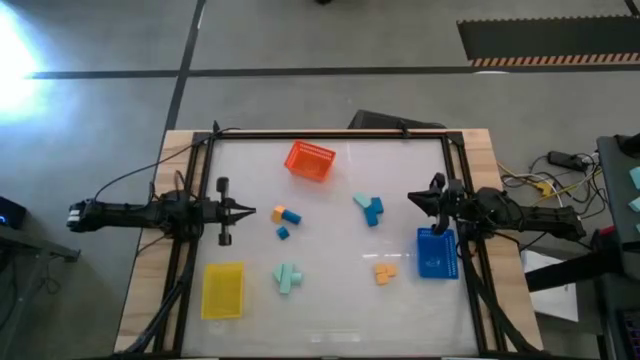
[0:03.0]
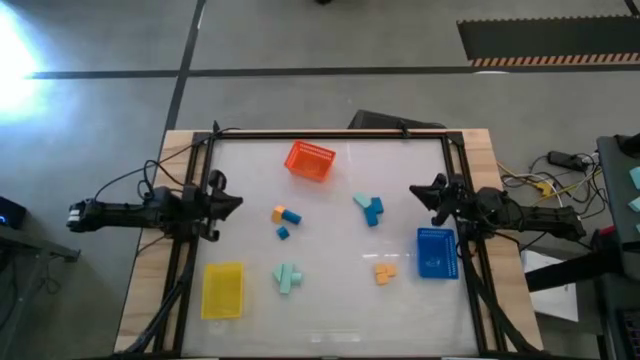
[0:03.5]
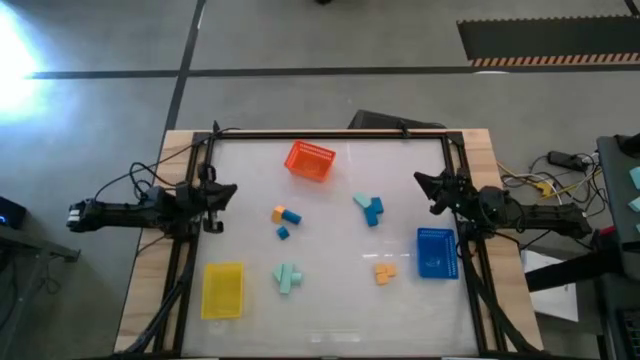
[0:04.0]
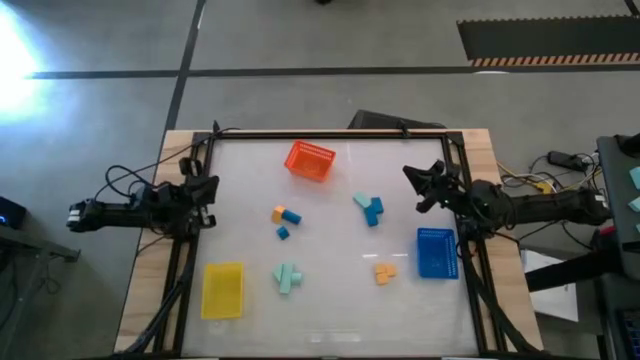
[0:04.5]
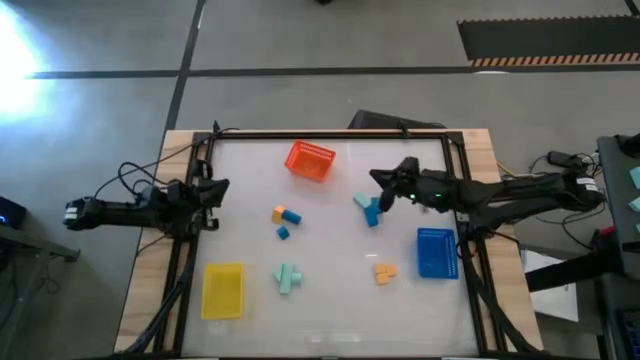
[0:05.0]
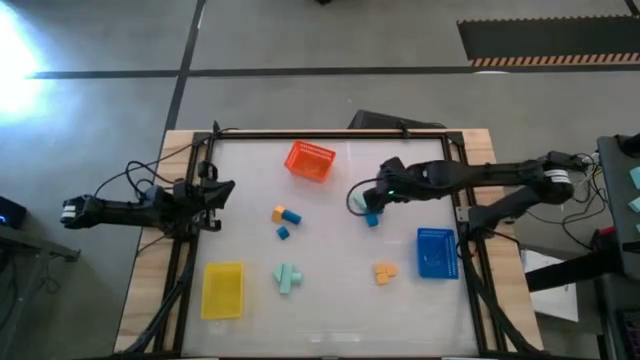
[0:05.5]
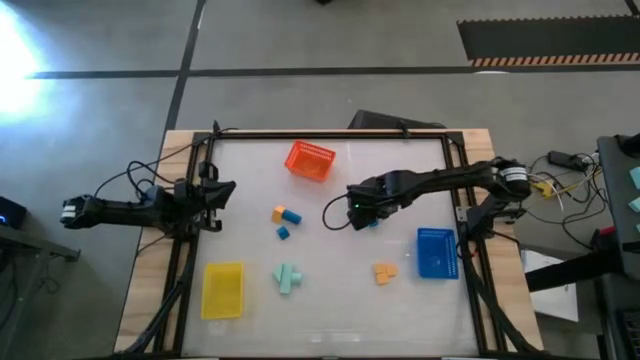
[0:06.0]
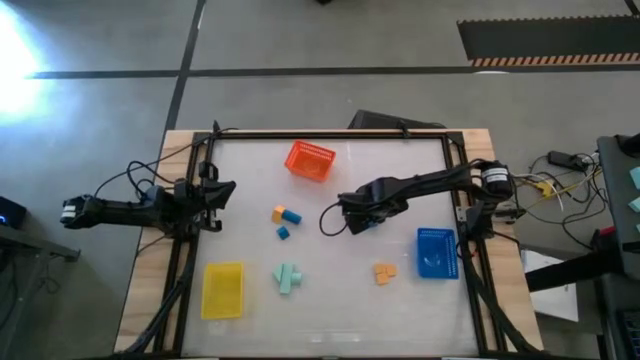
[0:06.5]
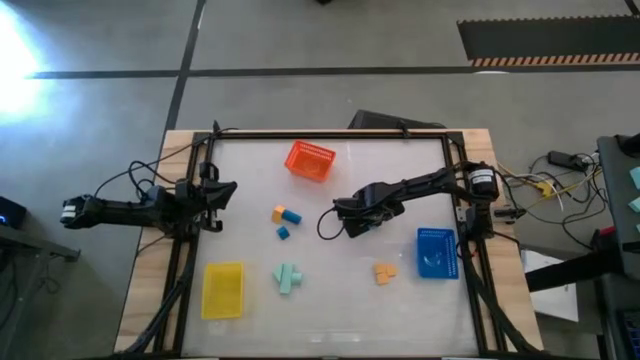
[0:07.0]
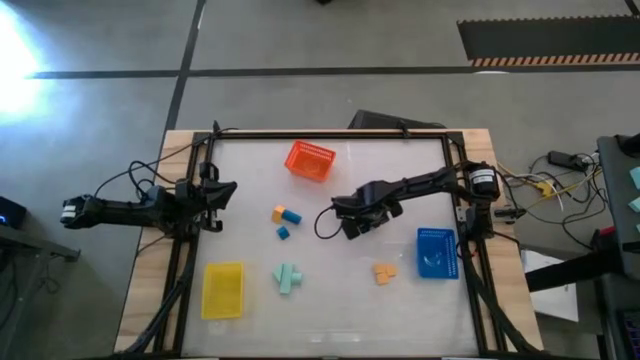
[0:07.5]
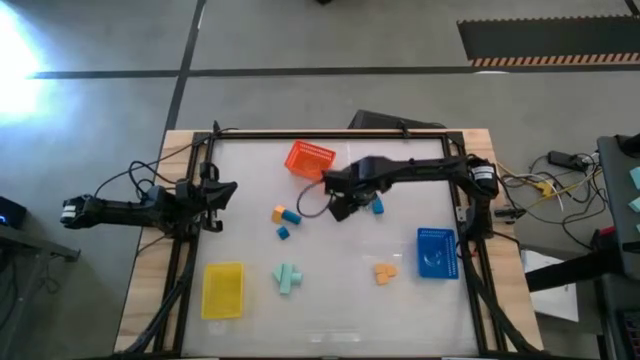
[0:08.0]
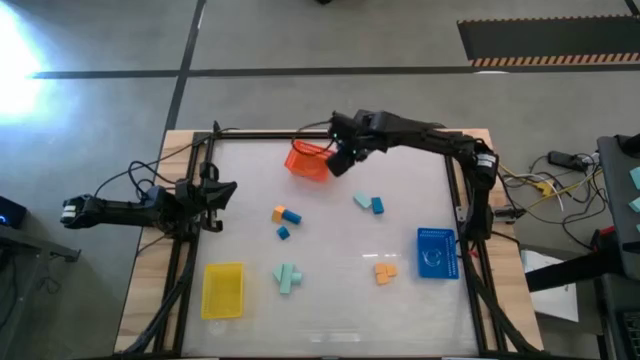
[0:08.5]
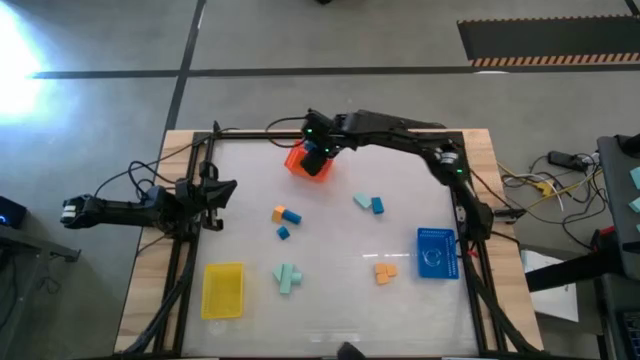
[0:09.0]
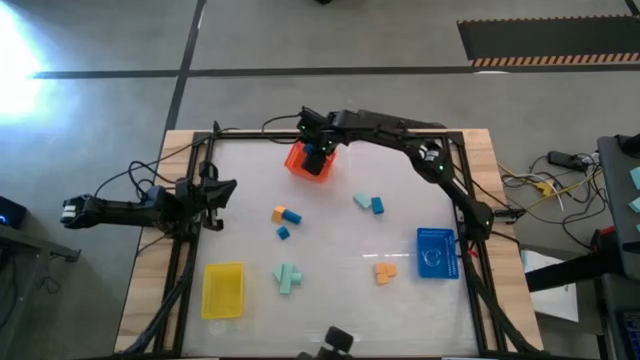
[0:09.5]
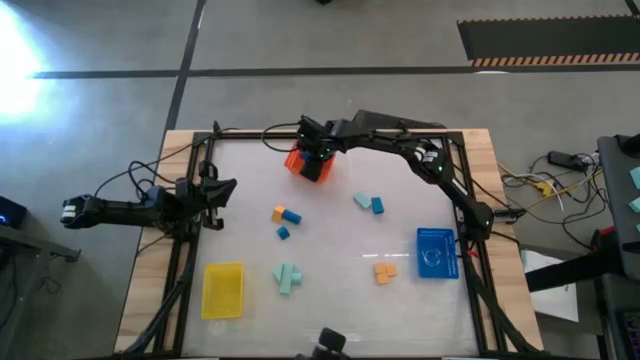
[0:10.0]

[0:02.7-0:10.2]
Task: Sort & place blocks by color
Put the blue block into the orange bin

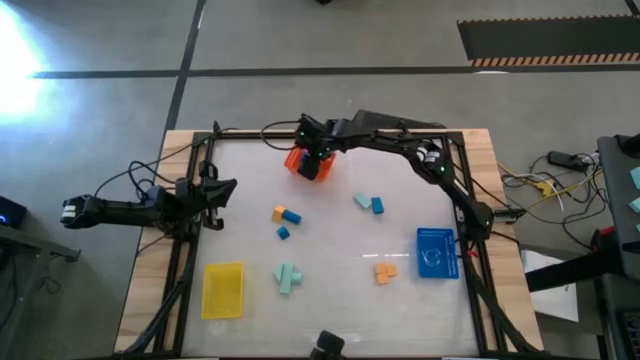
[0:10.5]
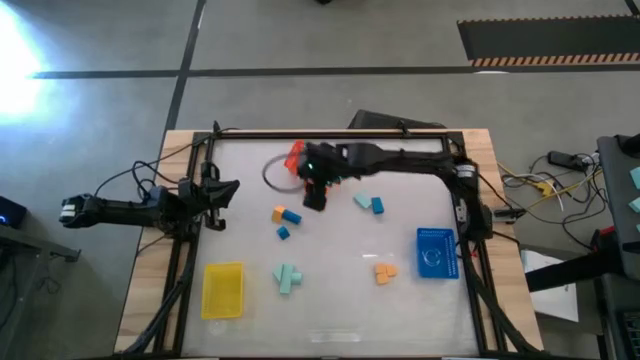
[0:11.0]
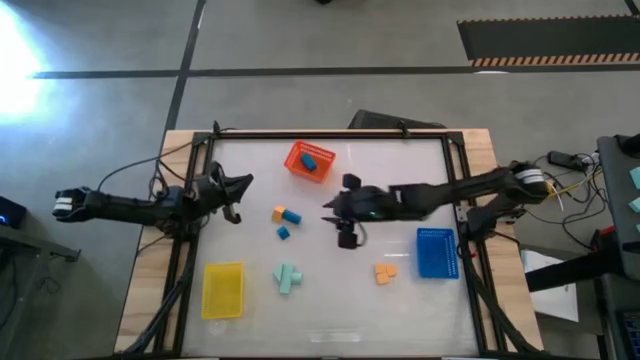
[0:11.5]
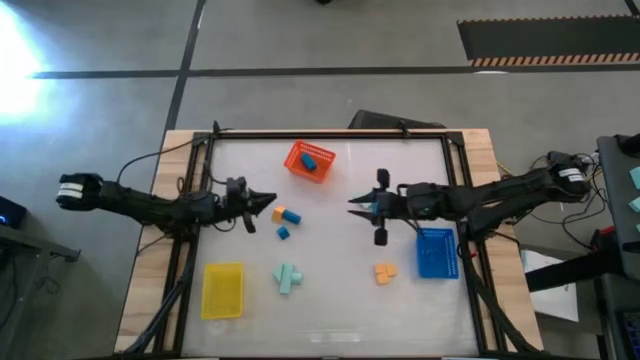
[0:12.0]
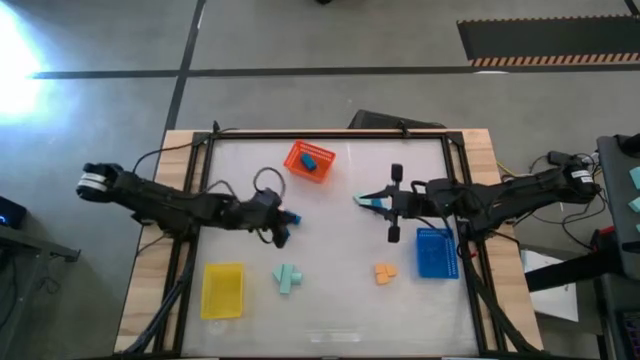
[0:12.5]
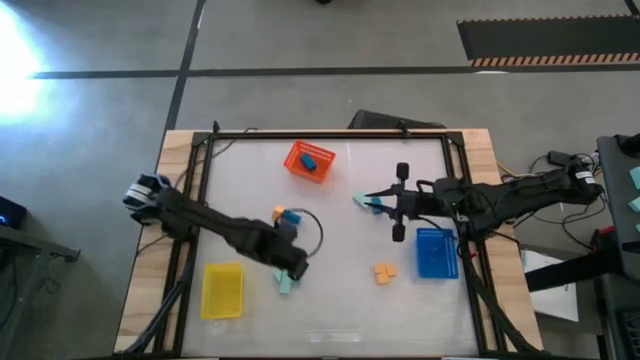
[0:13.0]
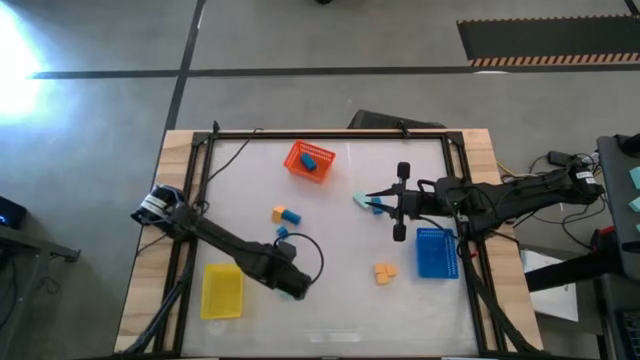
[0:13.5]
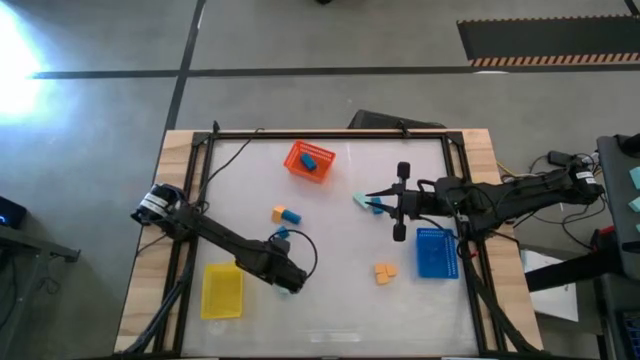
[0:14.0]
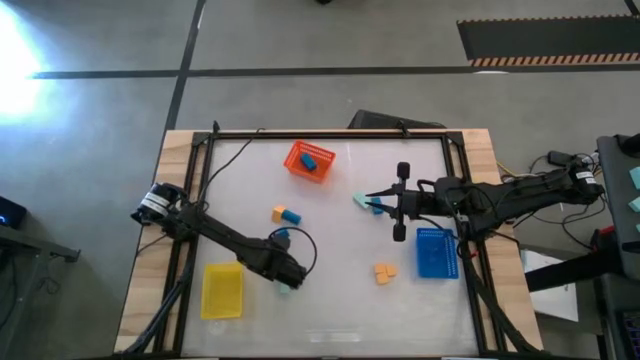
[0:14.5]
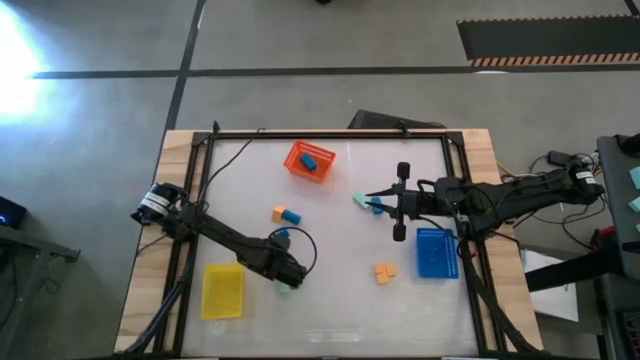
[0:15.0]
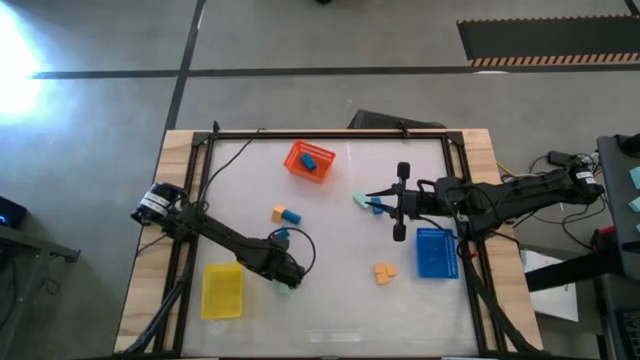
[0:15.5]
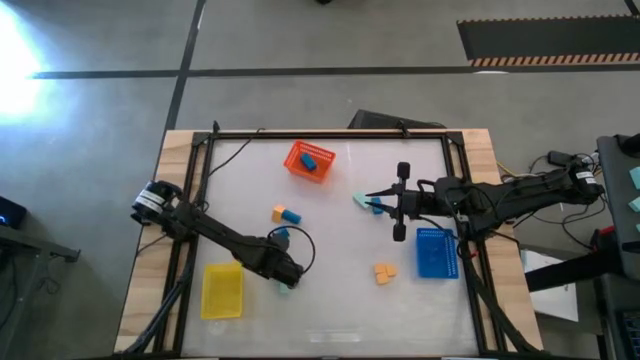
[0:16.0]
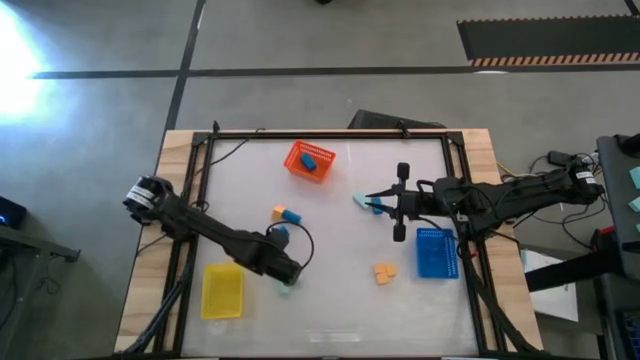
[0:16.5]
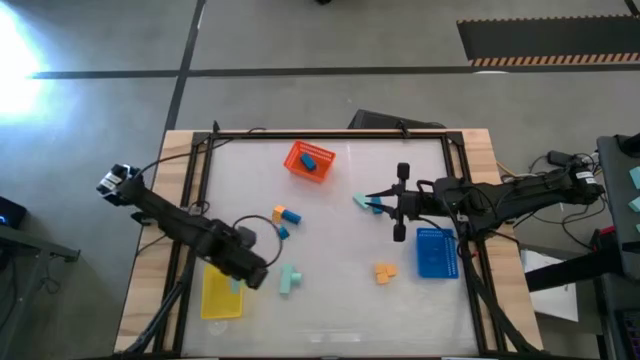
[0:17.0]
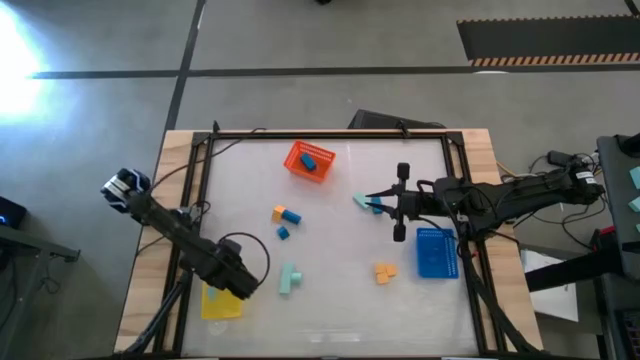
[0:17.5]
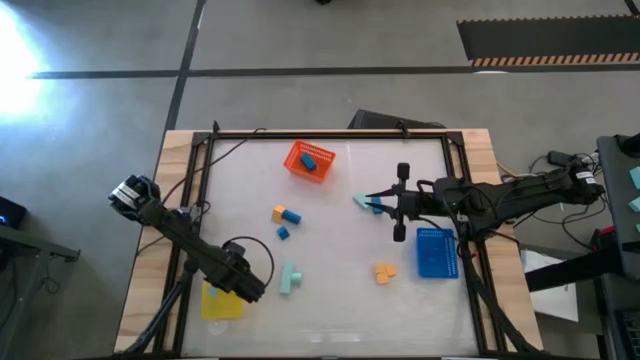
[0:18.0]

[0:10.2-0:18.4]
Put the green block into the yellow bin

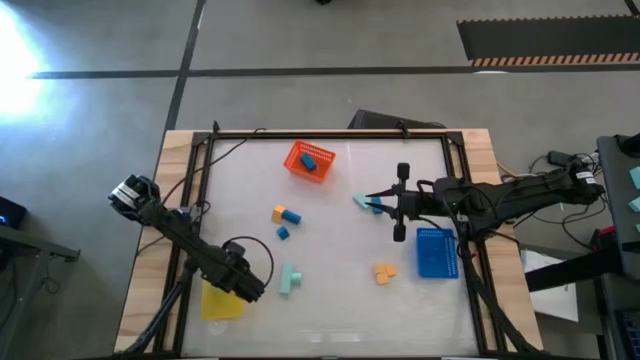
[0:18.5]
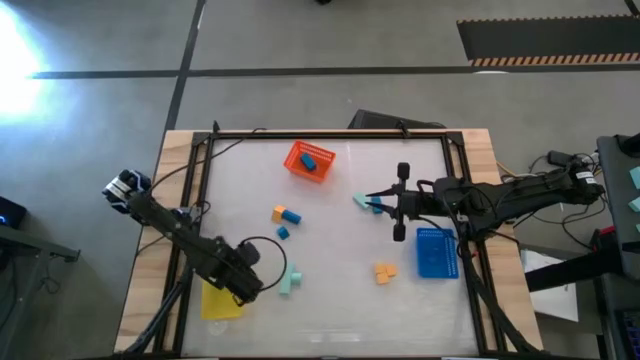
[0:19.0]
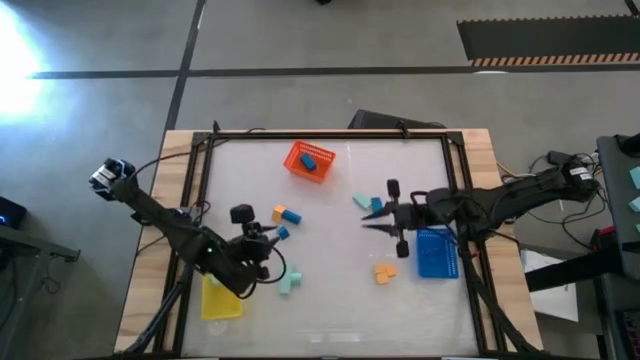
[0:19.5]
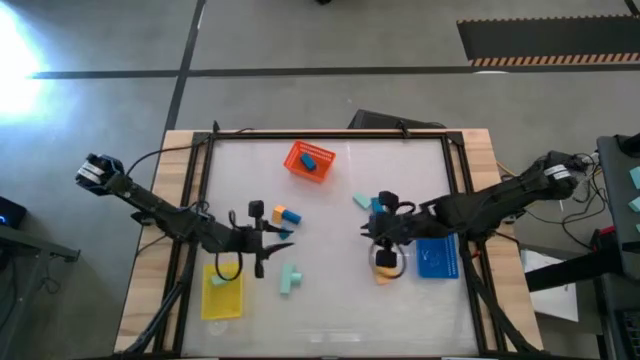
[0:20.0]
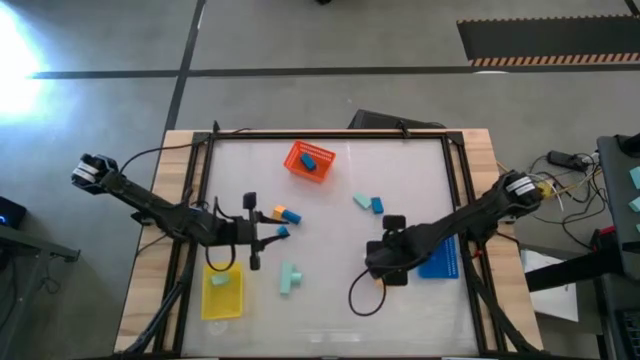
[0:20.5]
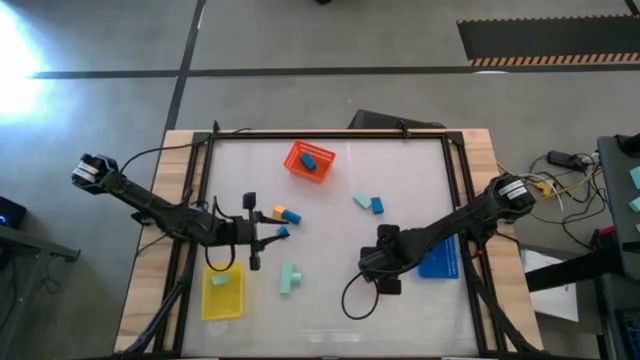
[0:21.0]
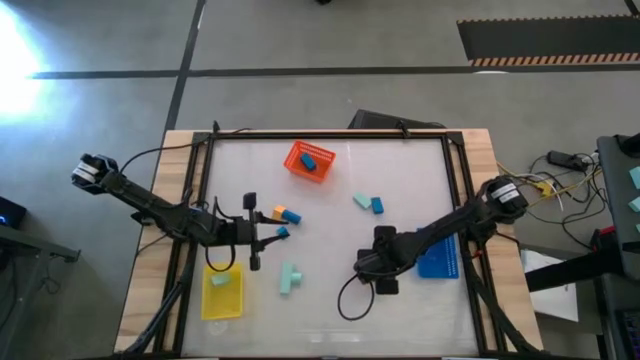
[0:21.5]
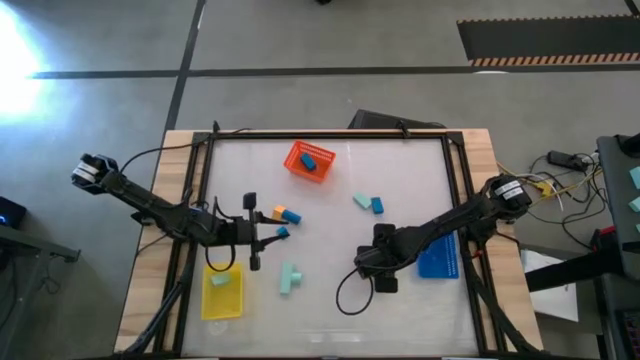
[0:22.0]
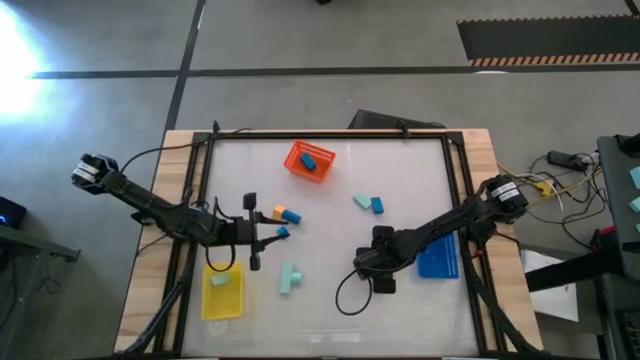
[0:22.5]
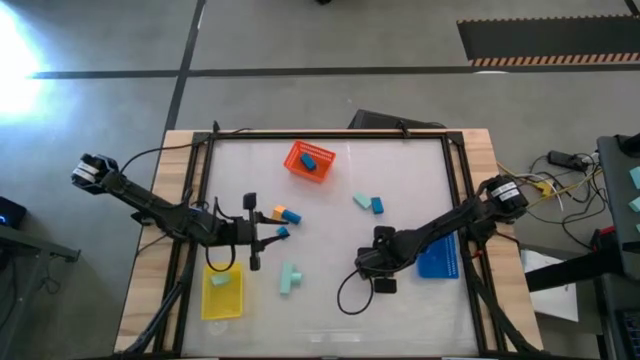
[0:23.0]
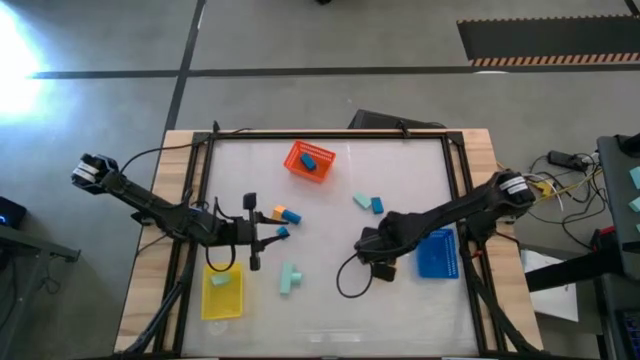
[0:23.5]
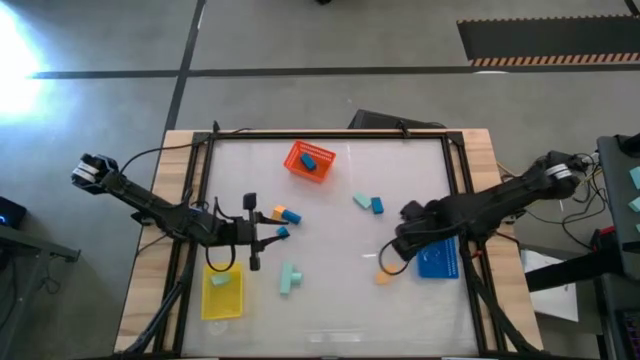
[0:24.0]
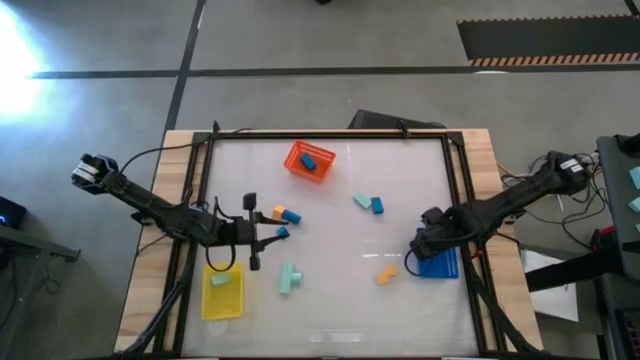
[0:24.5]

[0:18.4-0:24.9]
Put the yellow block into the blue bin
